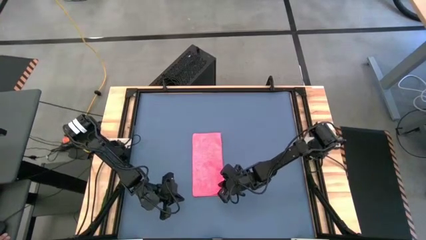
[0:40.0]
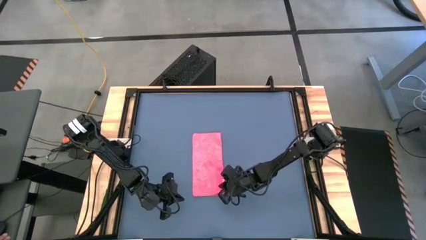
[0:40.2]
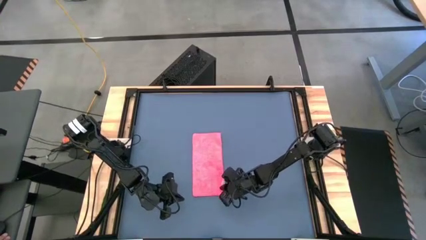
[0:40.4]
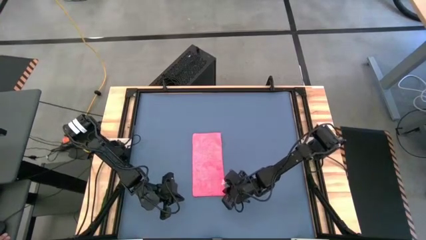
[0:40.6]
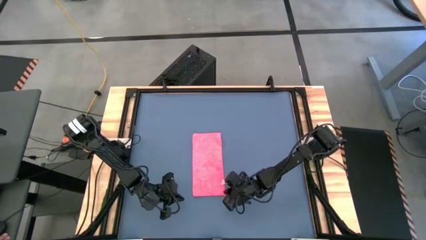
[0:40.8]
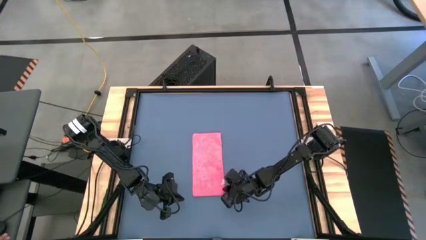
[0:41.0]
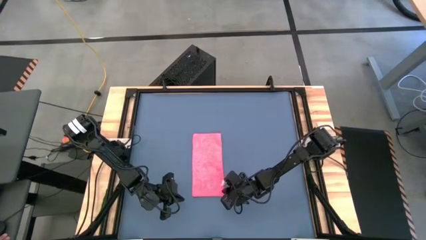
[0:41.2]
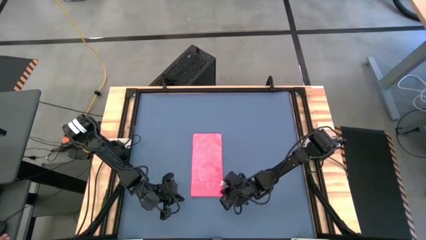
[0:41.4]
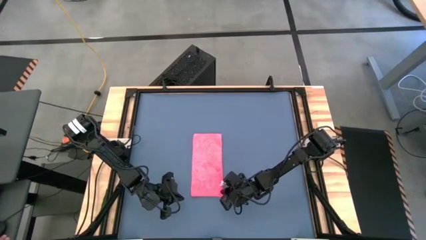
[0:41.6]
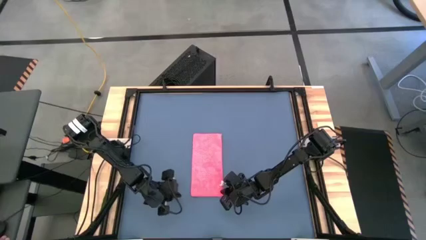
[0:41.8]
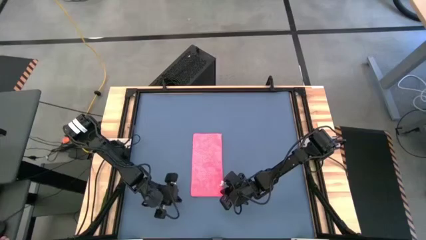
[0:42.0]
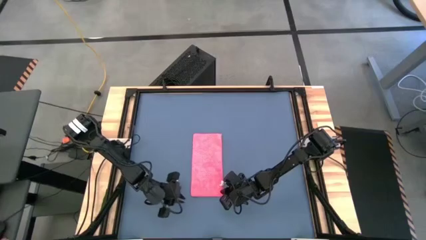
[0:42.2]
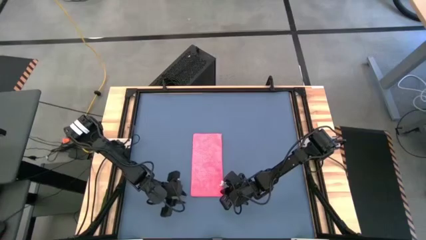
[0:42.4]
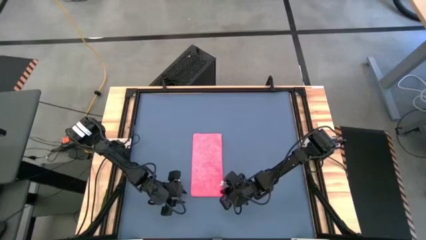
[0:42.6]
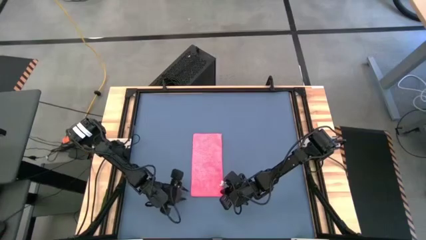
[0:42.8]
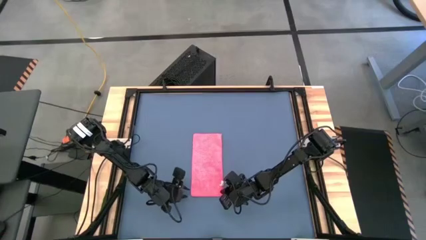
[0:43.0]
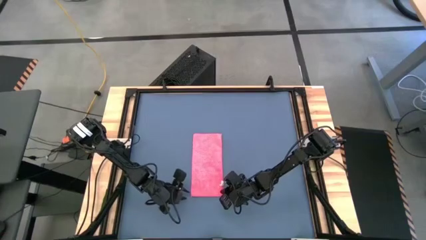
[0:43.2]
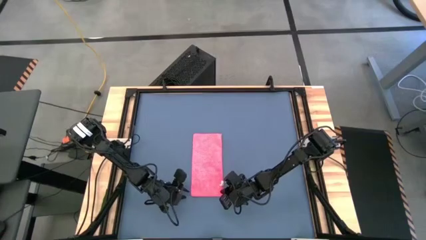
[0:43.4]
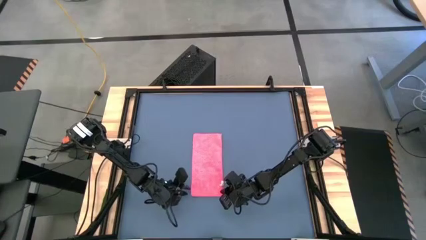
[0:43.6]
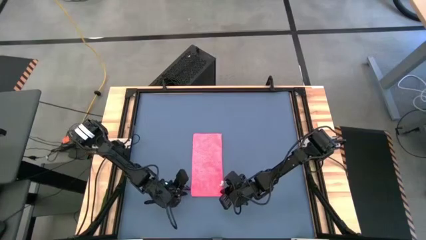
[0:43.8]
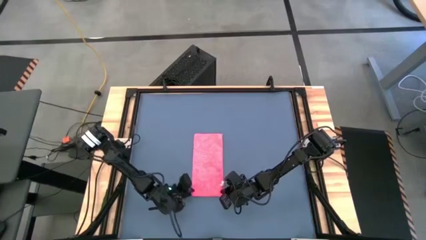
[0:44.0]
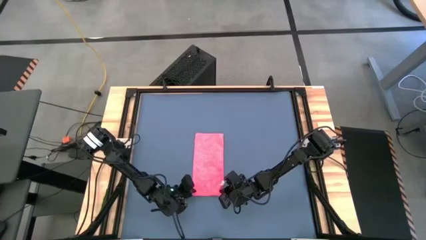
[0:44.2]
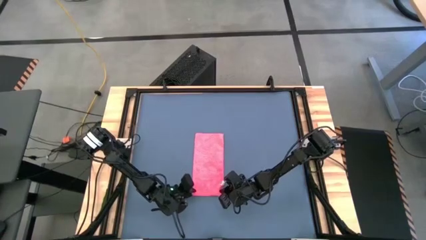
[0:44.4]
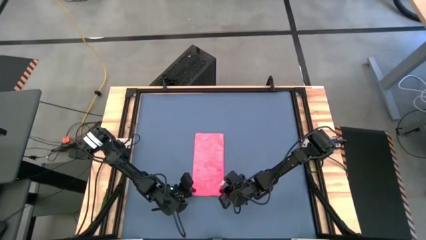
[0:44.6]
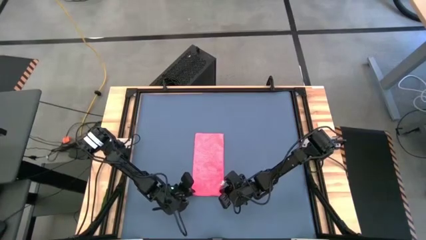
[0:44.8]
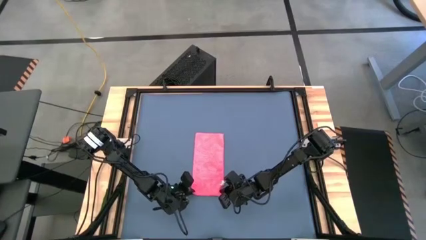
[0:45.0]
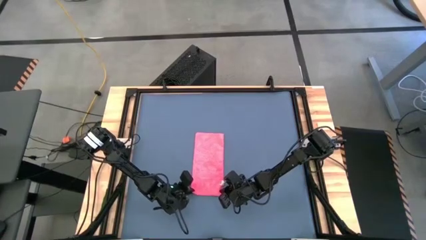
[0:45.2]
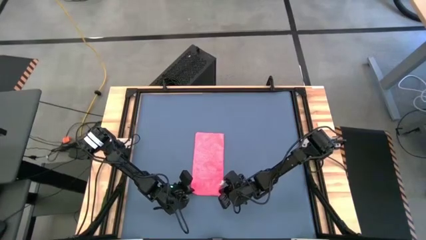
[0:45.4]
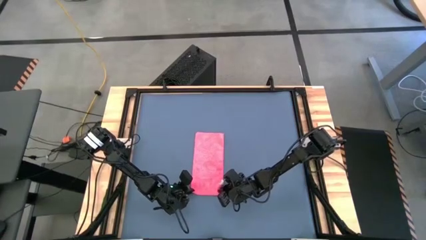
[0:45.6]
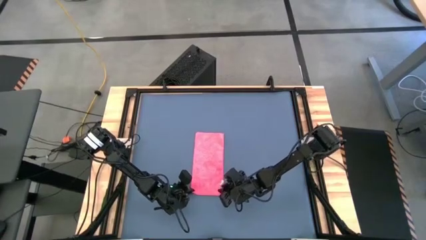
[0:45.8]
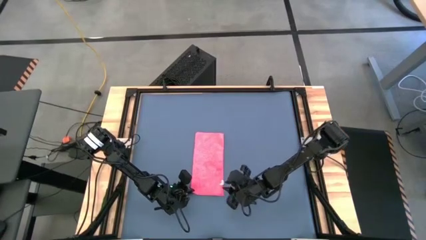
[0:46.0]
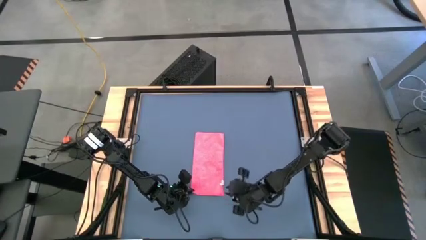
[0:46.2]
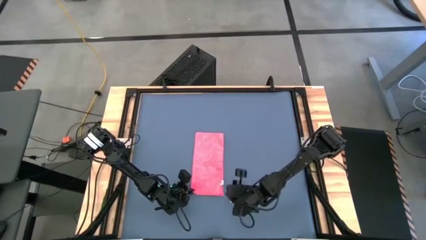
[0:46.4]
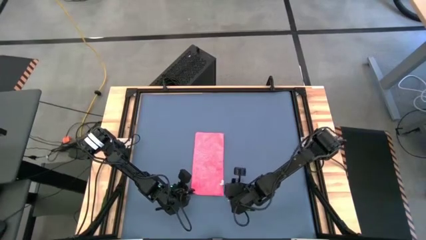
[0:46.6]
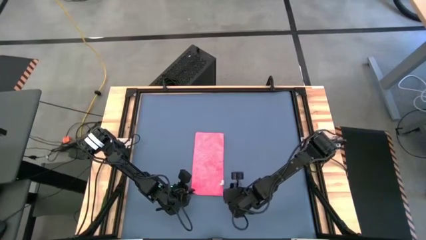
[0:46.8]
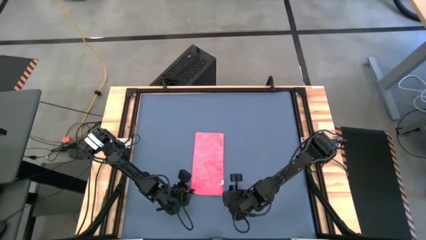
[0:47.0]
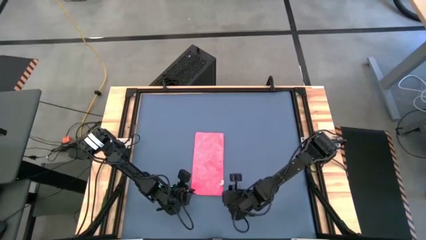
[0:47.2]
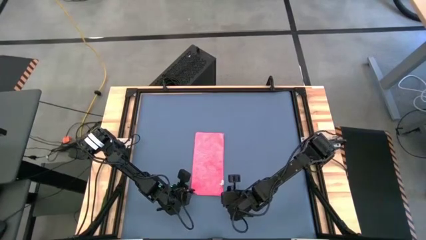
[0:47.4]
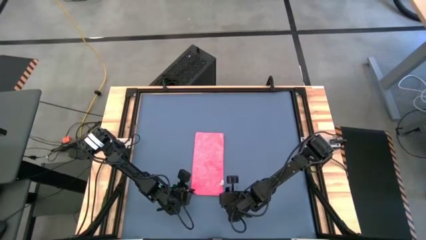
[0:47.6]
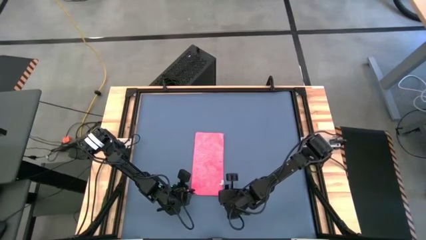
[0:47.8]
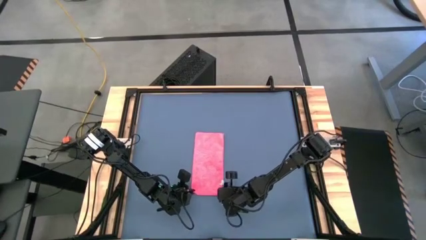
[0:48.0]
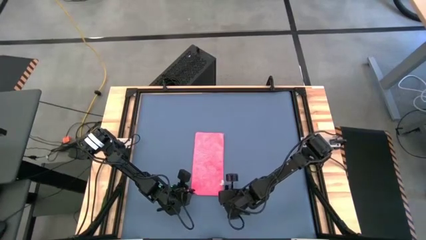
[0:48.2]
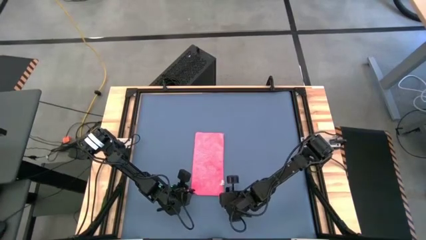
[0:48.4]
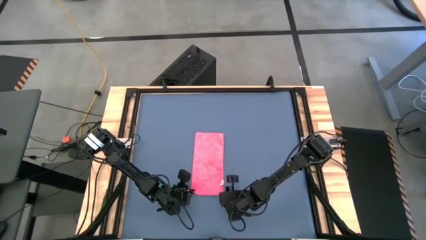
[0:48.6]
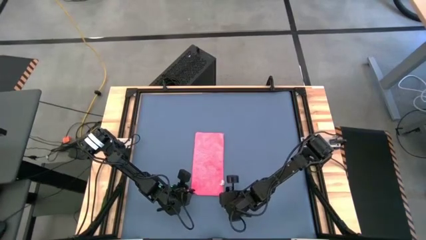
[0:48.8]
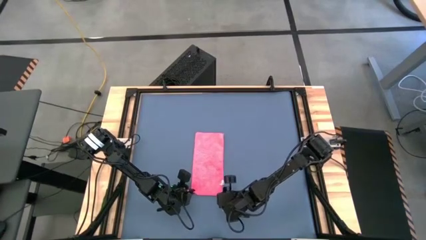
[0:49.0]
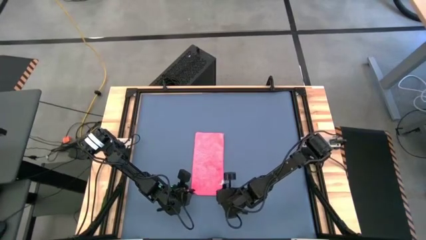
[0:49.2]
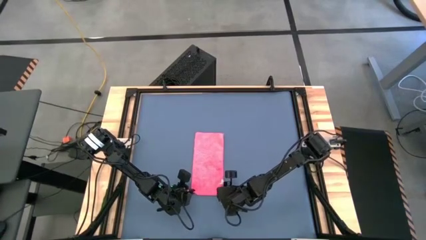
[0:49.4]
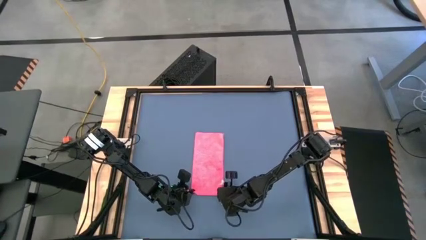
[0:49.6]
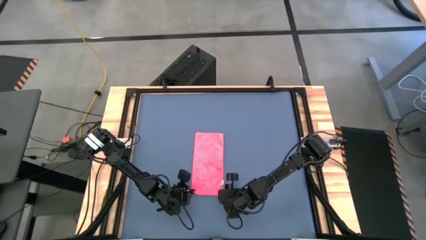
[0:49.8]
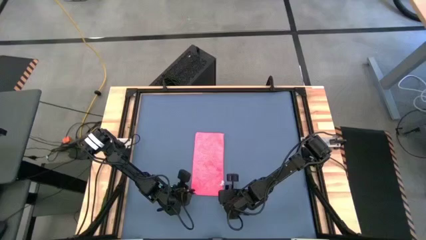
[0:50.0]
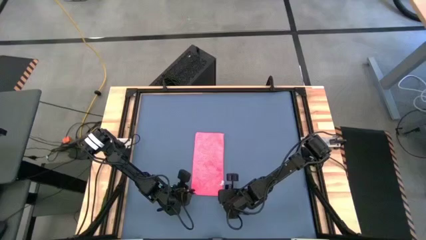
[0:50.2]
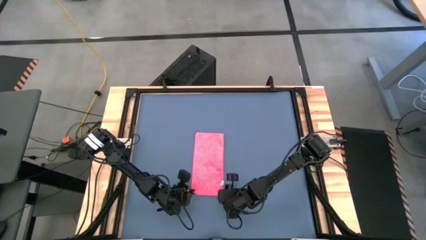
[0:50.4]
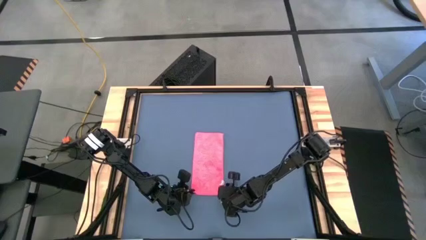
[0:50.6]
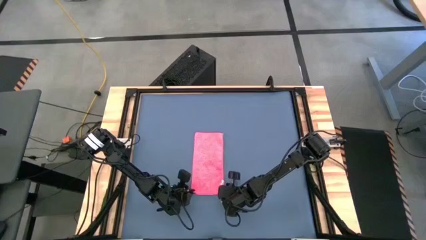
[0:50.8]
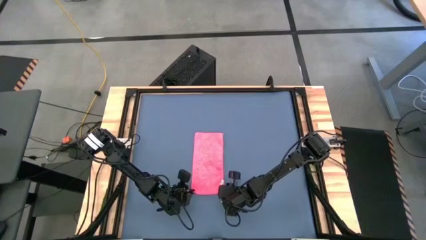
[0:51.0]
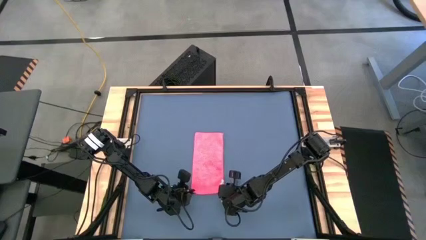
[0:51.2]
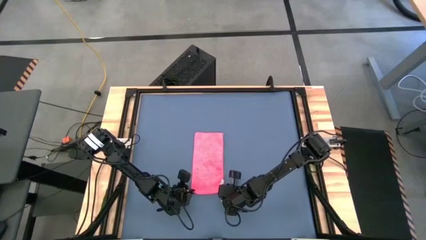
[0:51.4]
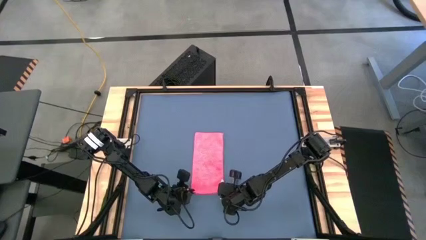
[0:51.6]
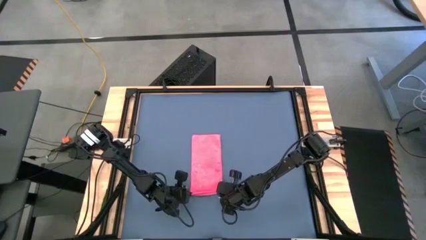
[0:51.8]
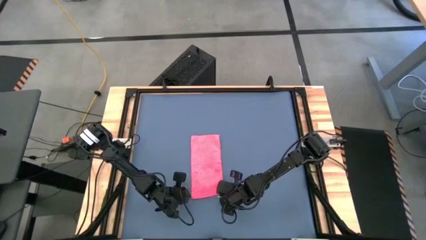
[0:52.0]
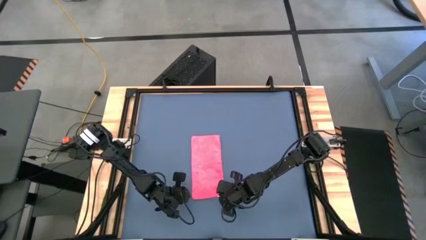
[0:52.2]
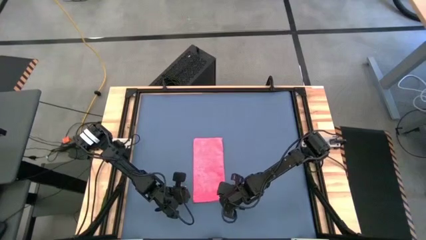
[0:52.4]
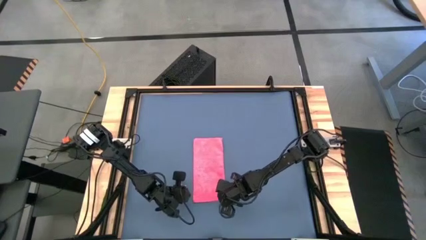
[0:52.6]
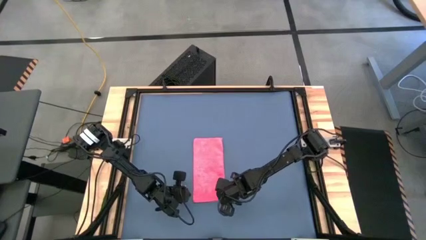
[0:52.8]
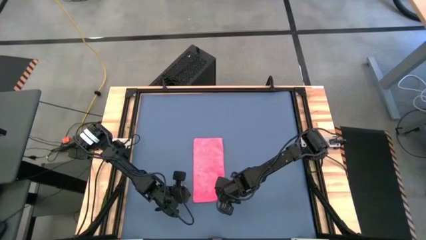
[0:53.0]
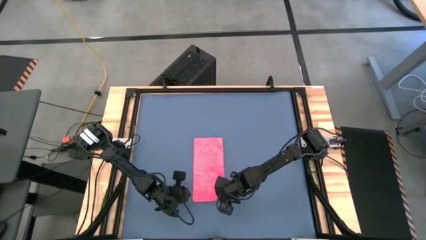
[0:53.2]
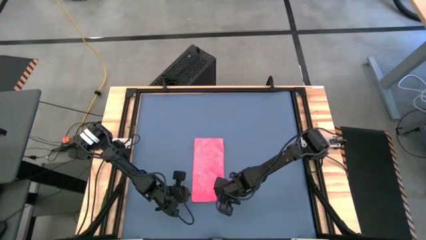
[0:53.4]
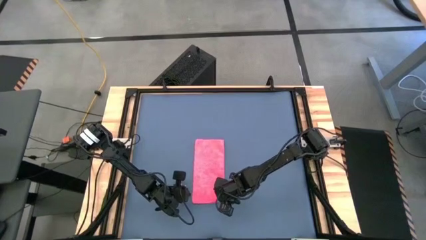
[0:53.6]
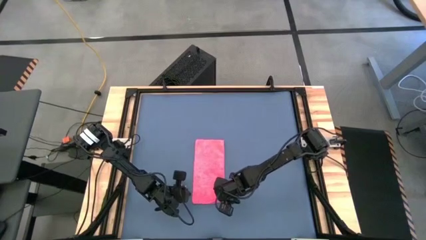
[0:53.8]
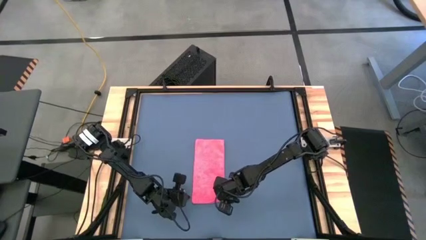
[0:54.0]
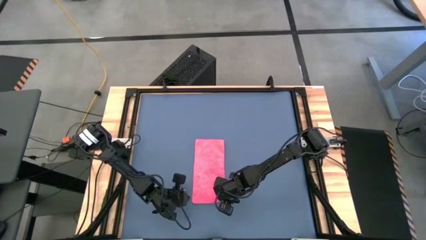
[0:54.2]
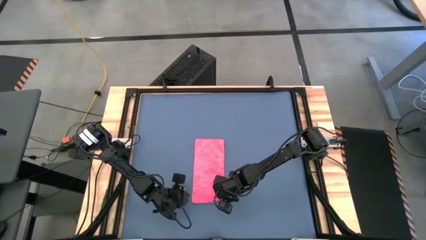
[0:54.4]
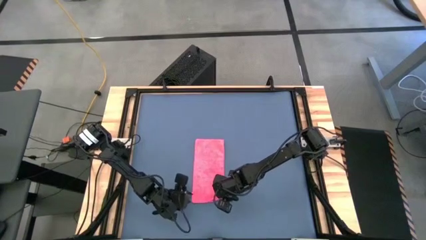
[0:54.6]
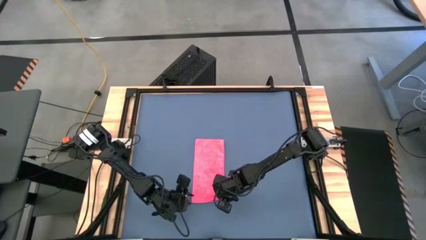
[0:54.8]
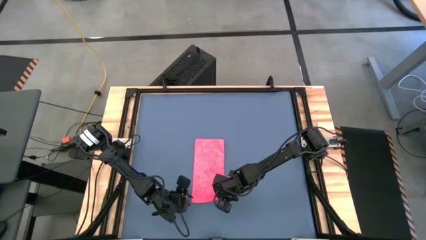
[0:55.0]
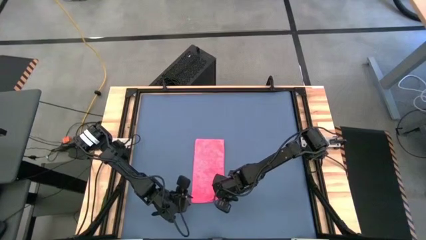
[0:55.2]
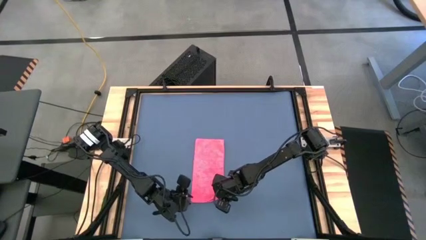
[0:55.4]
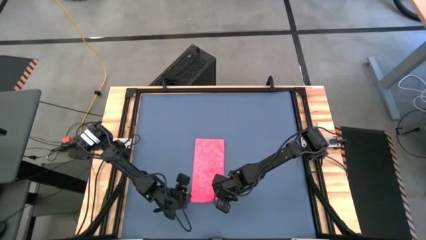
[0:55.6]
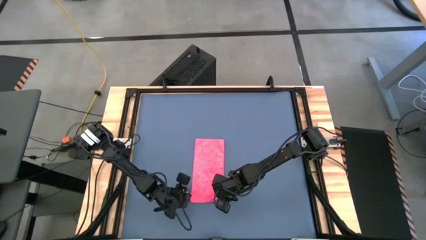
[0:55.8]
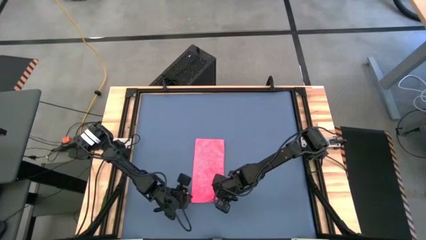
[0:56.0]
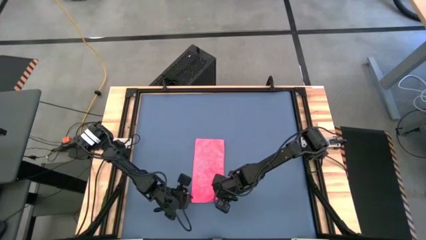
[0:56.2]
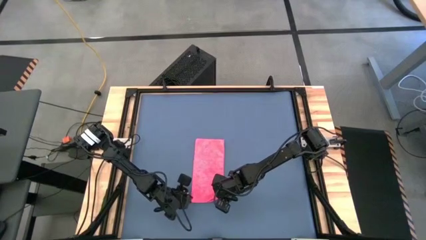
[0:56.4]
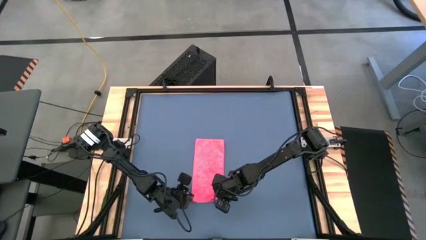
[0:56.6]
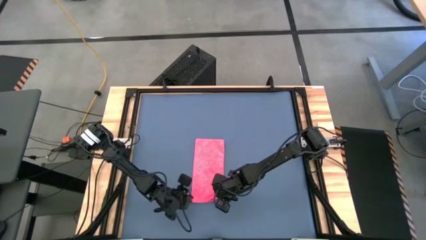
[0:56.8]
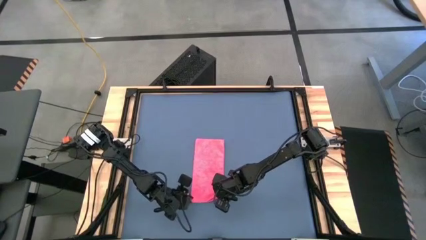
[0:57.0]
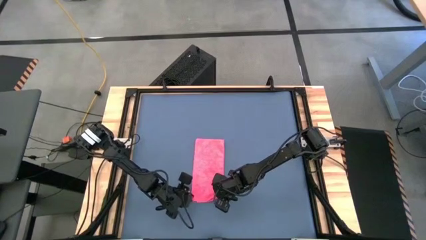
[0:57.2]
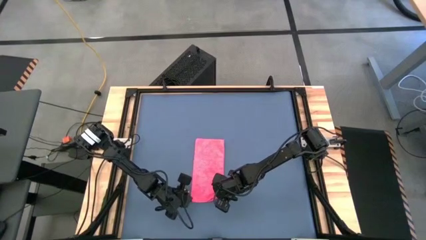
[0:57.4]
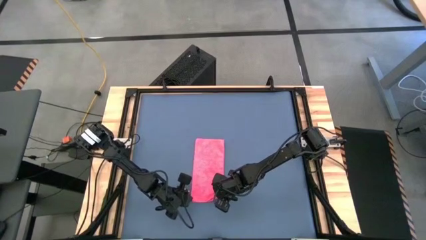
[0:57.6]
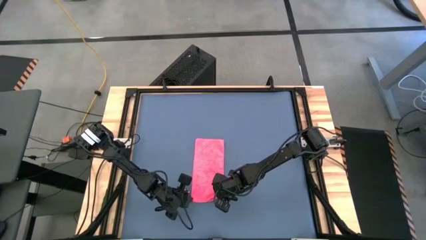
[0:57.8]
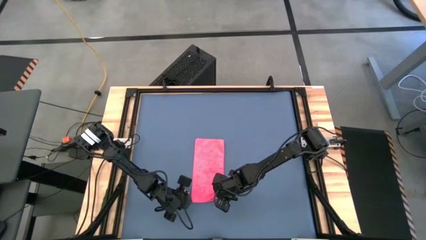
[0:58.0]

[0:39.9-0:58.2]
Task: Roll towel
Roll the pink towel
